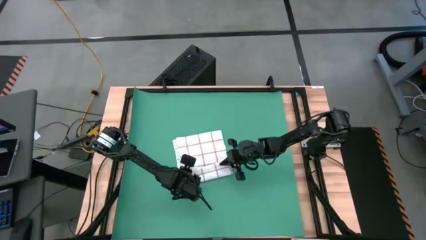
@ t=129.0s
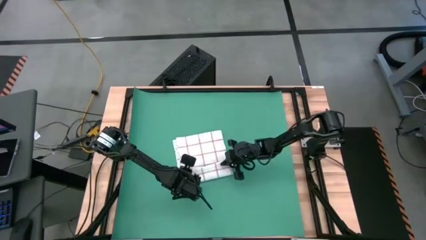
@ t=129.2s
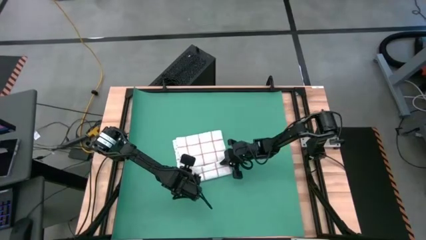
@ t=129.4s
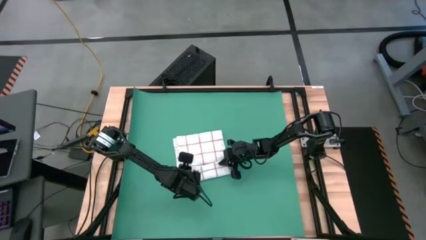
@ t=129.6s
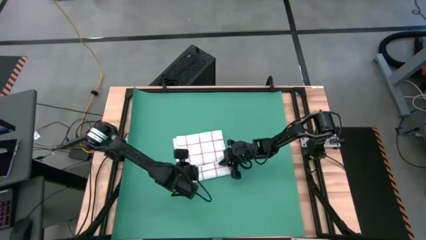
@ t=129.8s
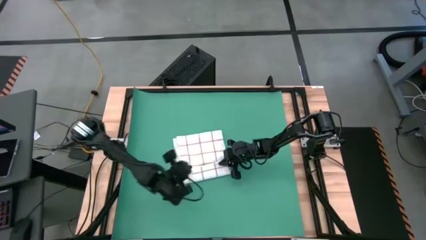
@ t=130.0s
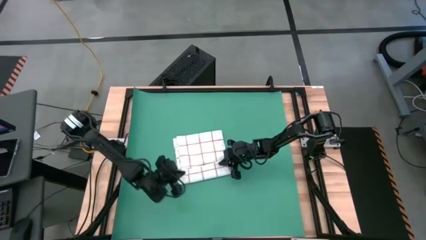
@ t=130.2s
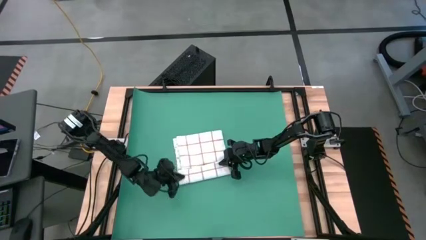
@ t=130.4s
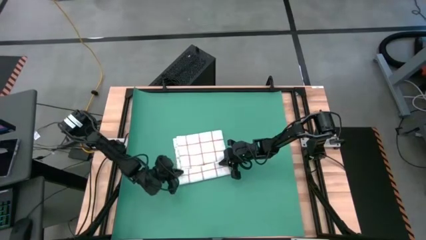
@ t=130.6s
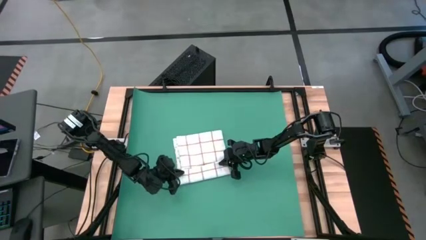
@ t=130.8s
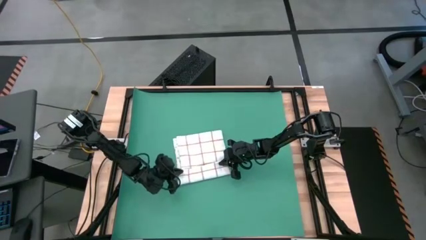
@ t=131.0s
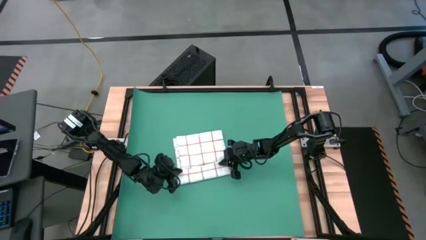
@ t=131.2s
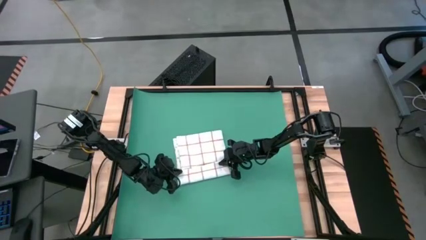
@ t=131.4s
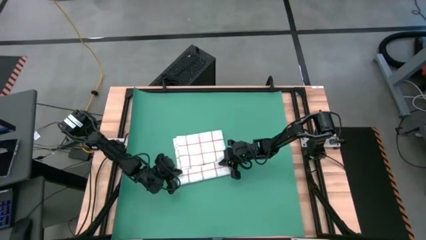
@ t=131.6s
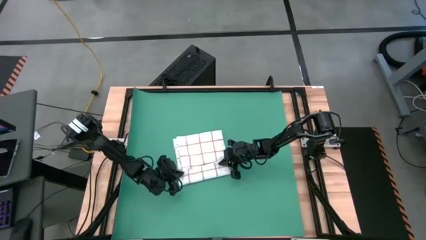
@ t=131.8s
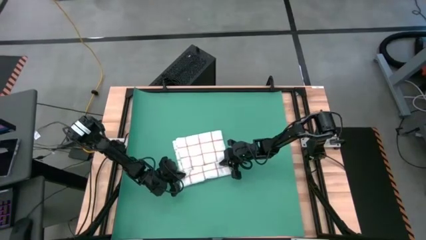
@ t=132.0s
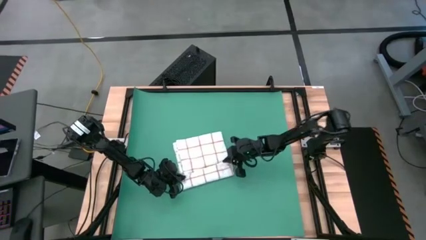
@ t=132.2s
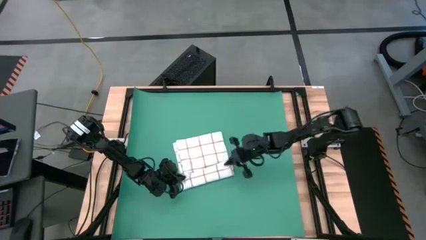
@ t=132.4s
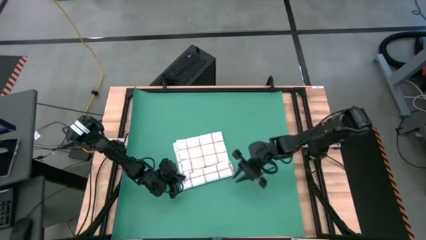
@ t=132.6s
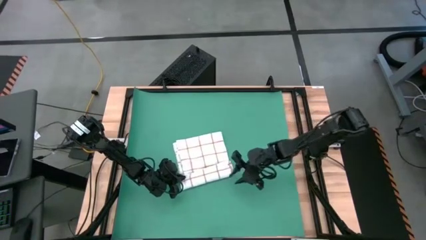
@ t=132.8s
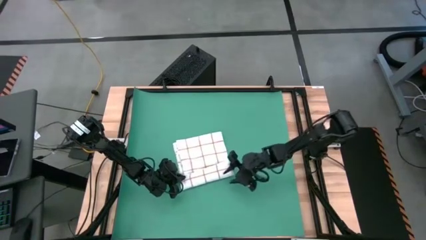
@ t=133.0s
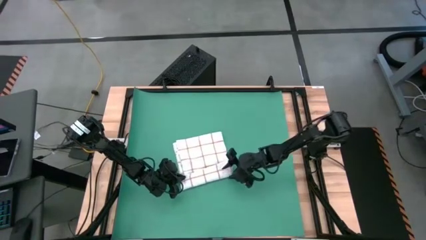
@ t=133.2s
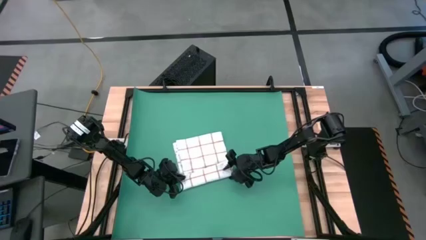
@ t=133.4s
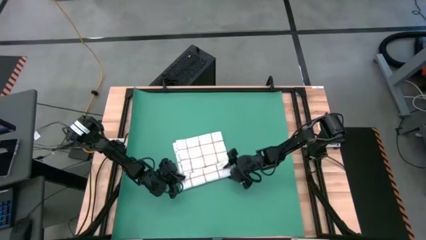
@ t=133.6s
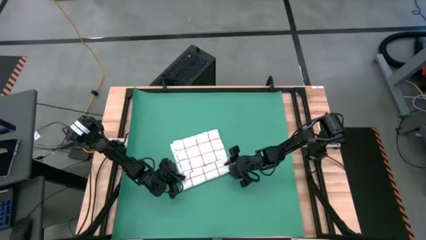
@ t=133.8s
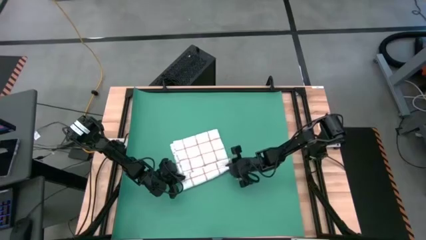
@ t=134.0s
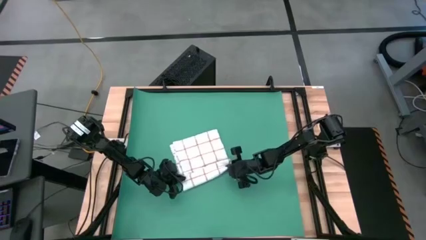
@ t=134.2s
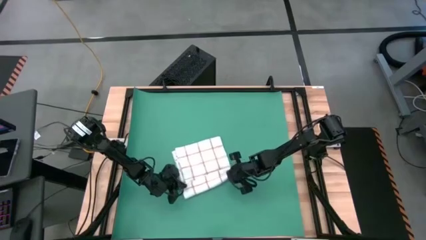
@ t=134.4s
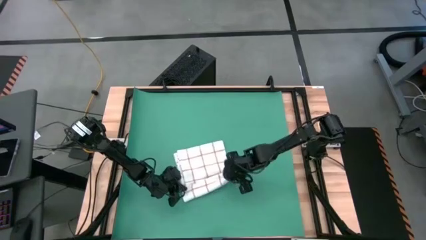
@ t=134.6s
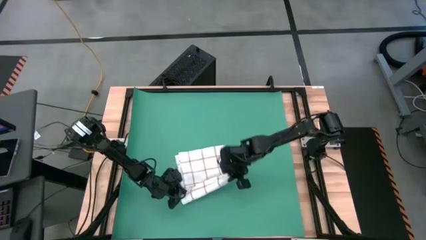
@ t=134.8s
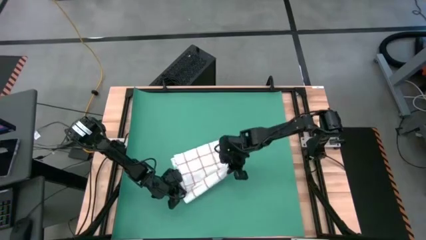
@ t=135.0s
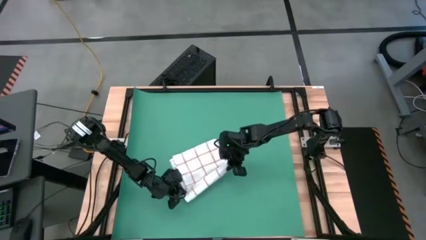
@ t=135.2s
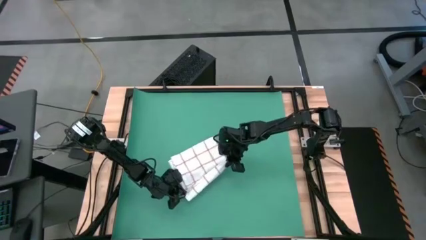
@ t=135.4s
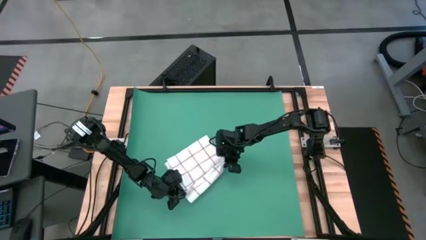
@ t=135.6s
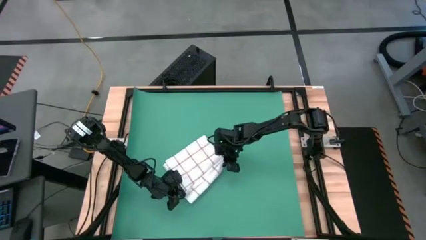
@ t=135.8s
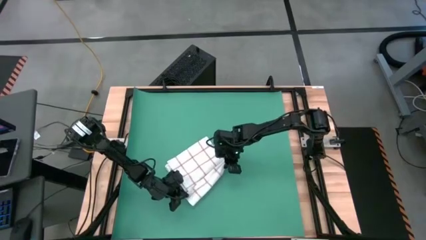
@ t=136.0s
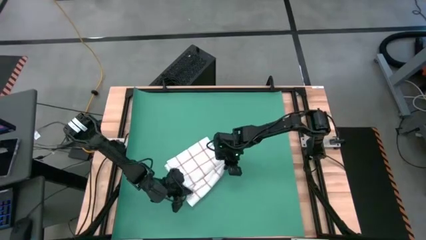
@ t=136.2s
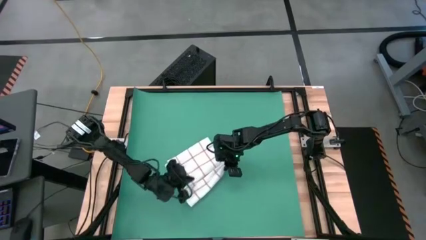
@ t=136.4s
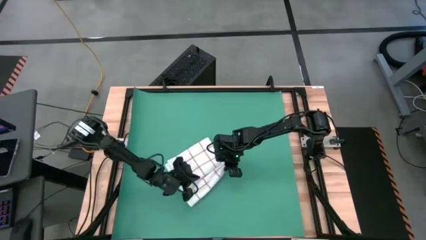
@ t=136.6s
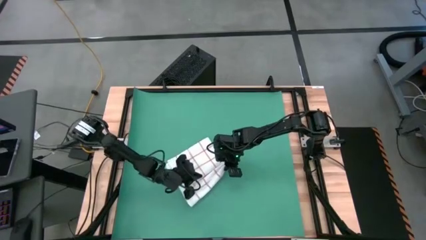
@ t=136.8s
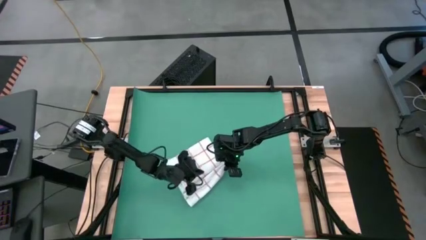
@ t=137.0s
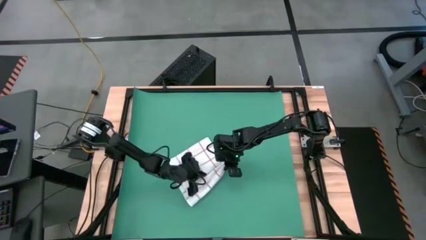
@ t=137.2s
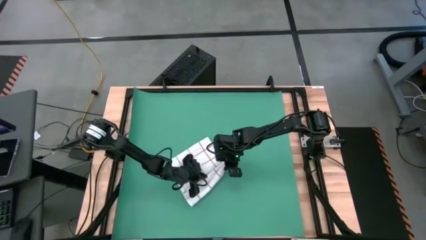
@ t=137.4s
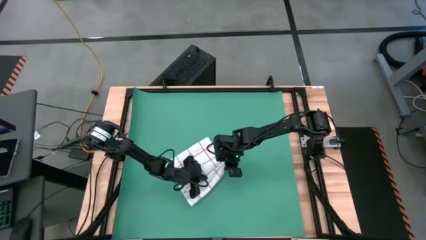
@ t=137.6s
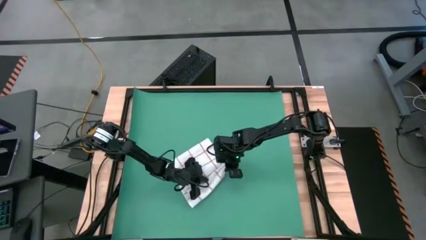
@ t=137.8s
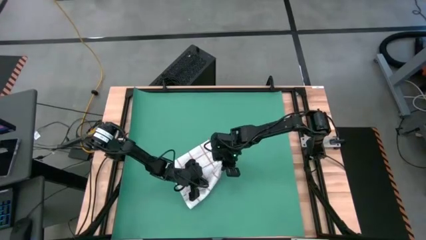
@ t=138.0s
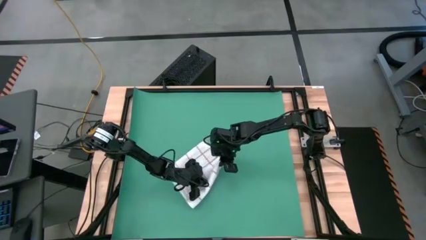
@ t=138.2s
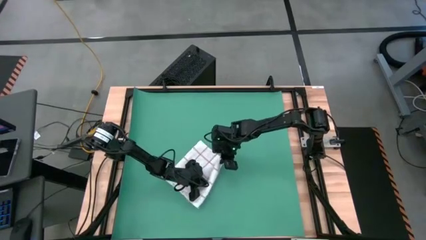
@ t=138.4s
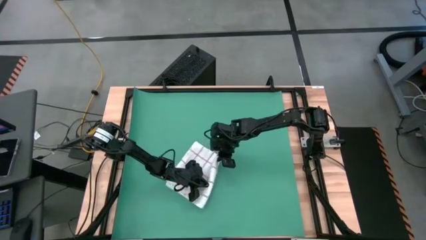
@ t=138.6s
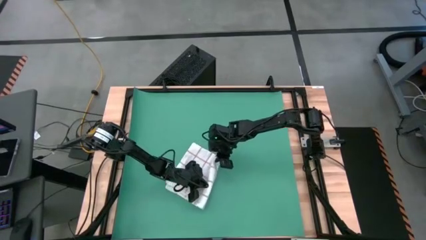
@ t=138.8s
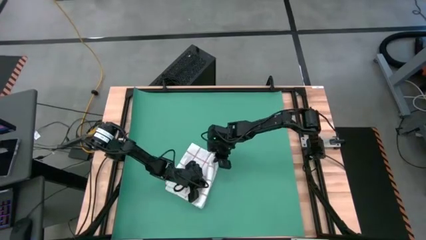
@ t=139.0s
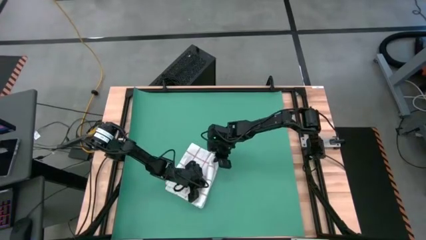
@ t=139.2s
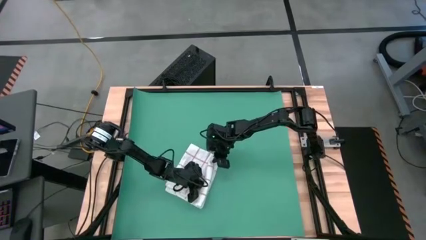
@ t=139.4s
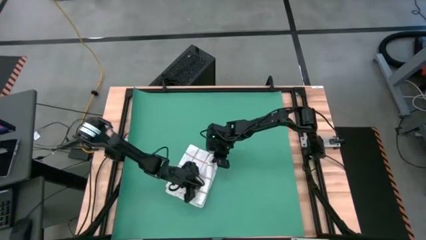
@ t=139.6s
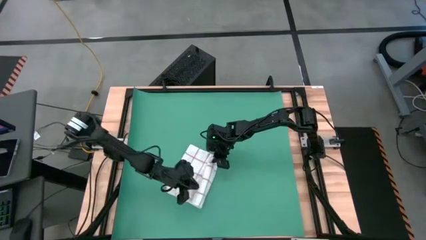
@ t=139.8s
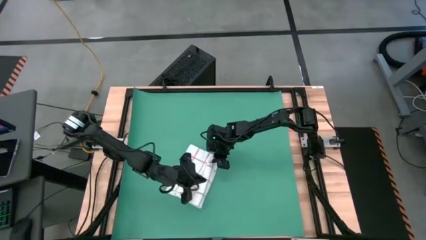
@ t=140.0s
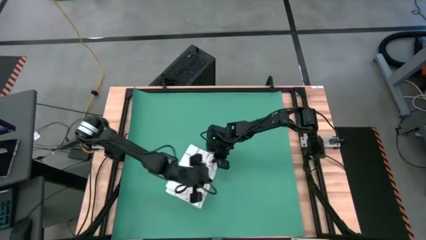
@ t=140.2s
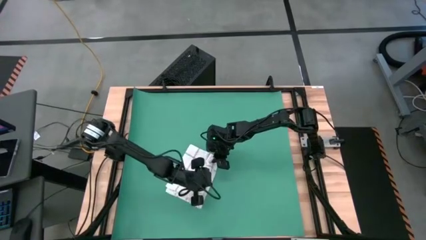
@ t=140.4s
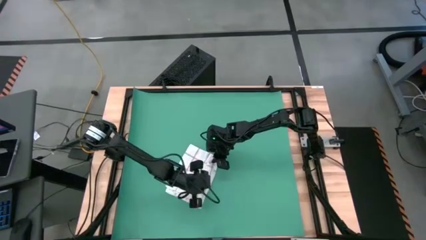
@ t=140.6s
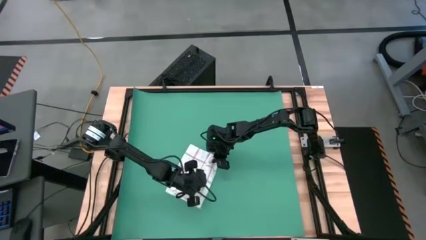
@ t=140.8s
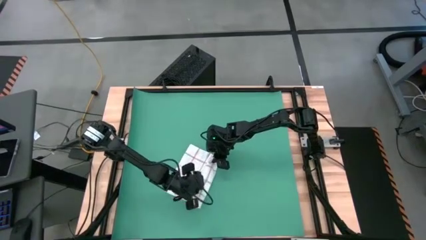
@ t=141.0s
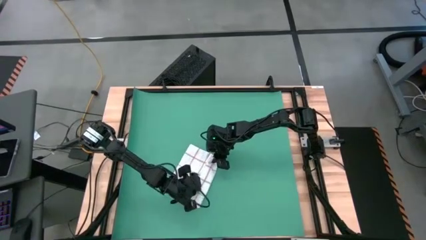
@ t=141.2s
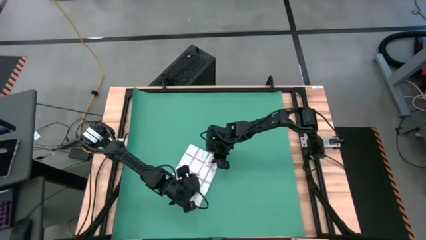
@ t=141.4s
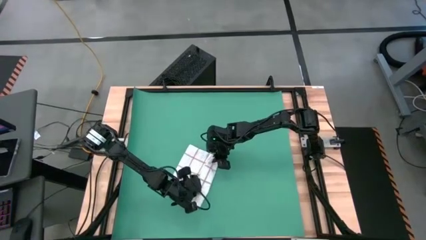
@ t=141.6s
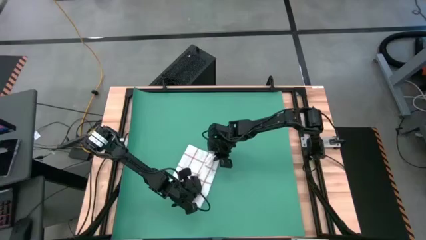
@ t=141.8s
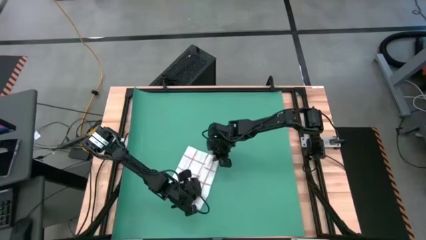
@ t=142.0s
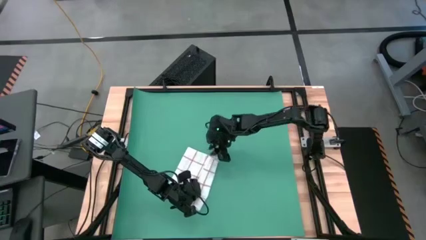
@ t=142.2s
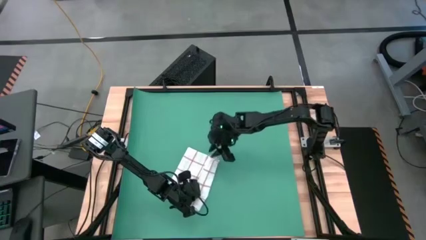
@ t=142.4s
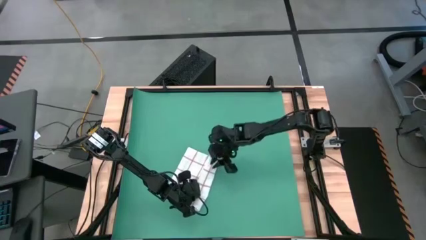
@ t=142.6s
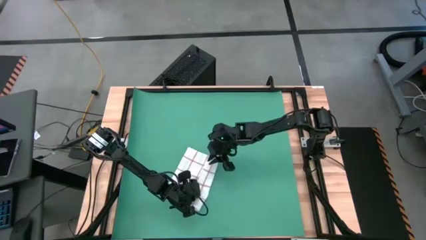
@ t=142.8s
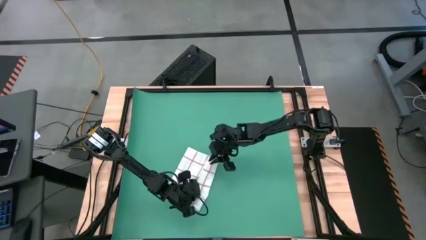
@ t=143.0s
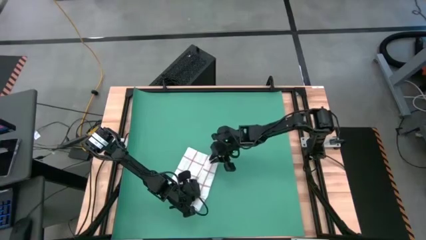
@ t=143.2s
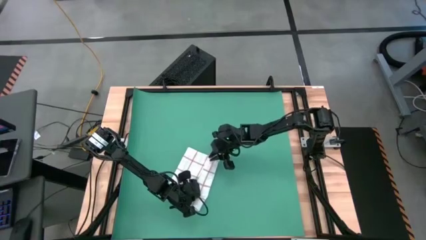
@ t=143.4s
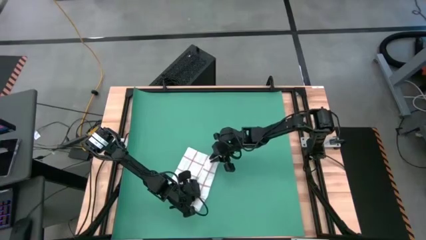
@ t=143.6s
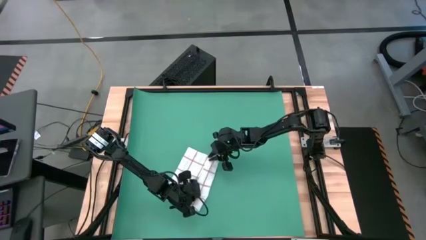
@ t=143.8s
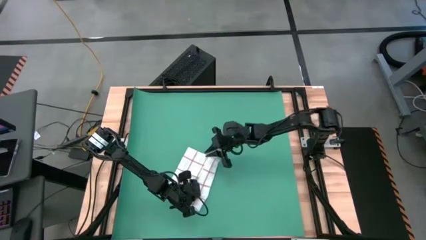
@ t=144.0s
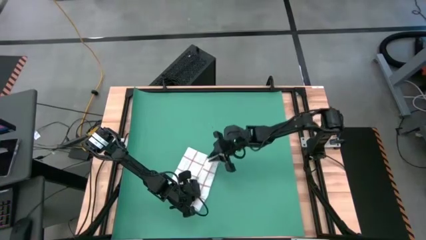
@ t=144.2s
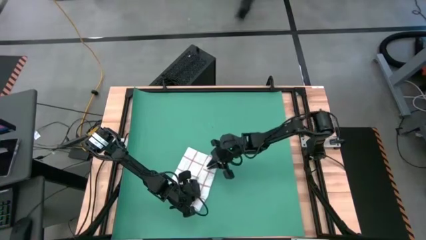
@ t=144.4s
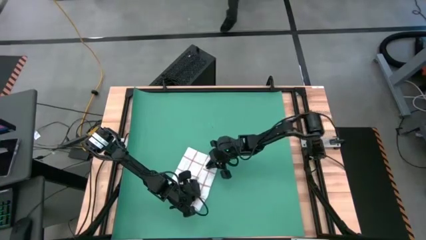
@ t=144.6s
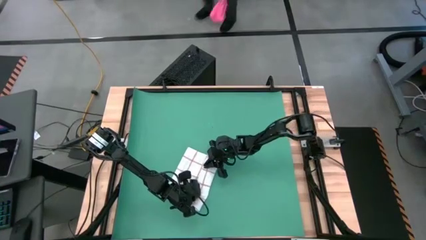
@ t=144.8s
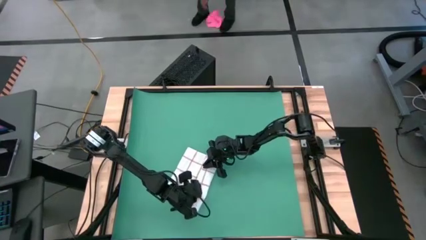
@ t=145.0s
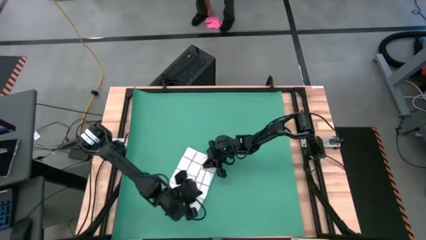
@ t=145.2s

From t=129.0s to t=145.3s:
Task: Roll towel
Roll the white towel
